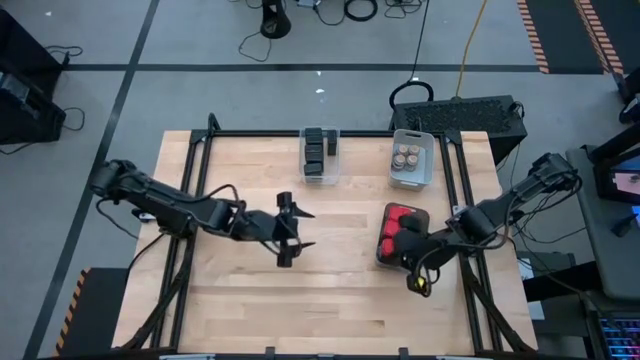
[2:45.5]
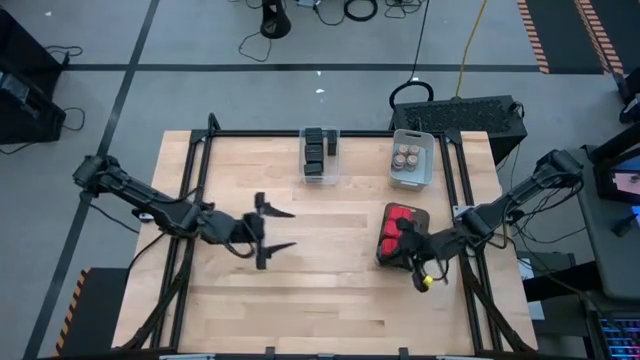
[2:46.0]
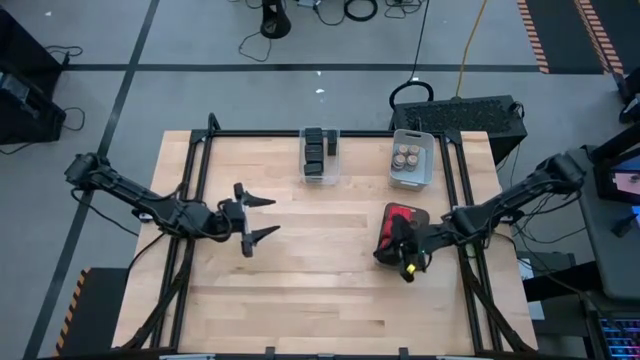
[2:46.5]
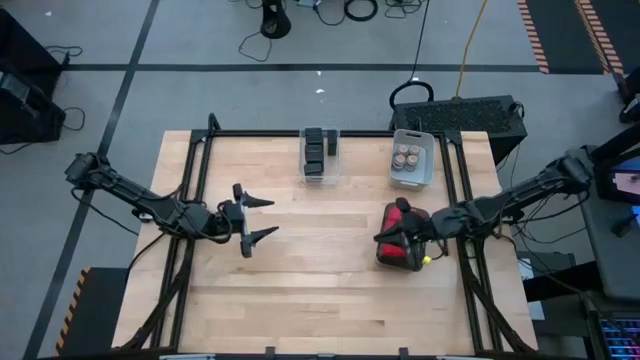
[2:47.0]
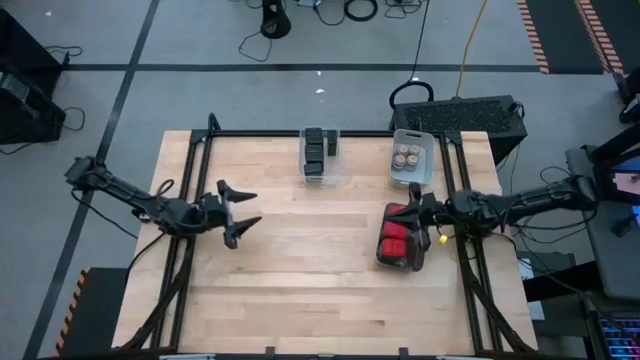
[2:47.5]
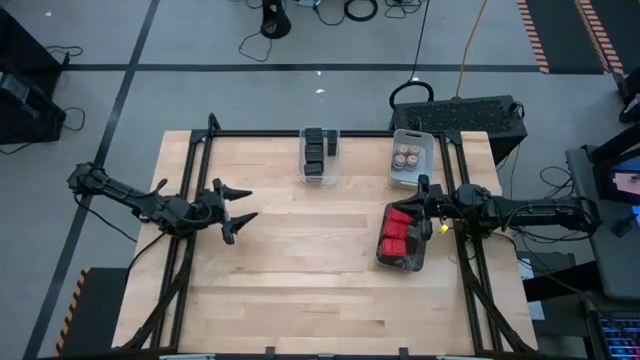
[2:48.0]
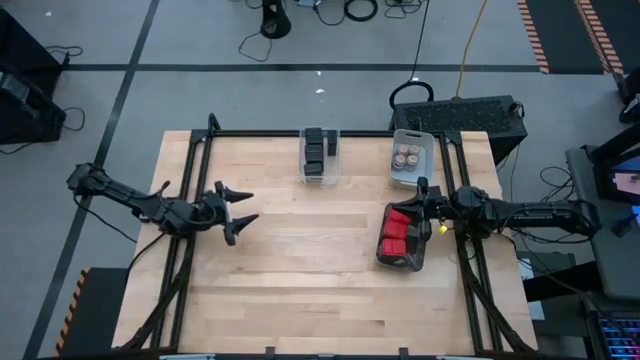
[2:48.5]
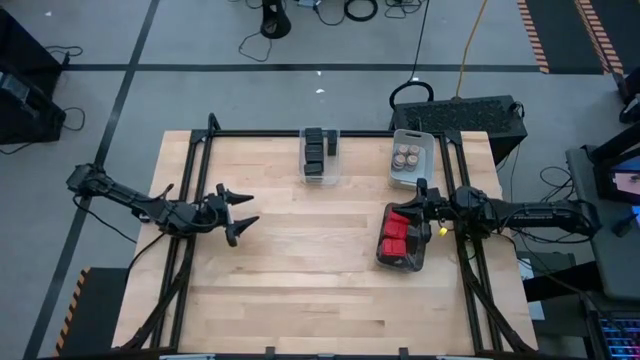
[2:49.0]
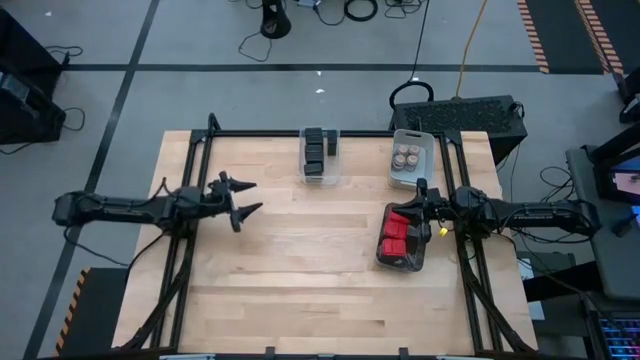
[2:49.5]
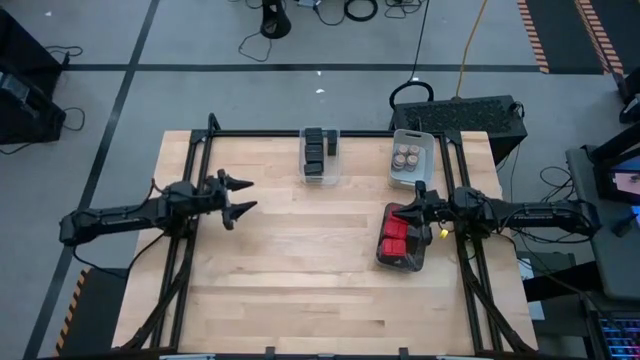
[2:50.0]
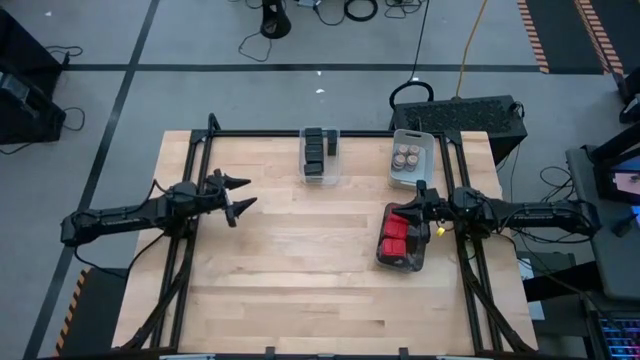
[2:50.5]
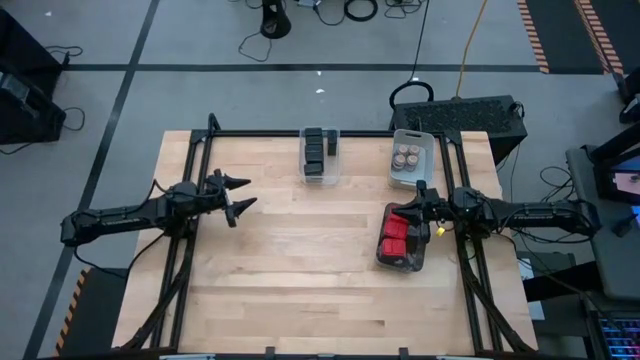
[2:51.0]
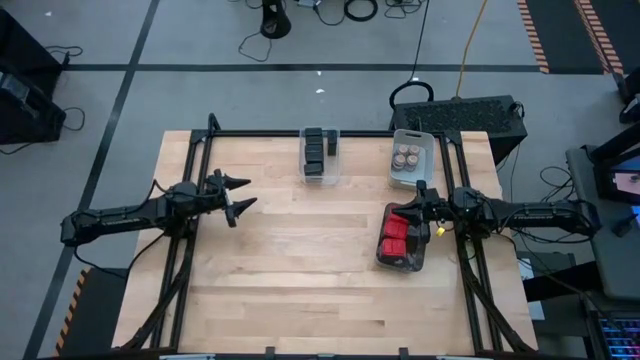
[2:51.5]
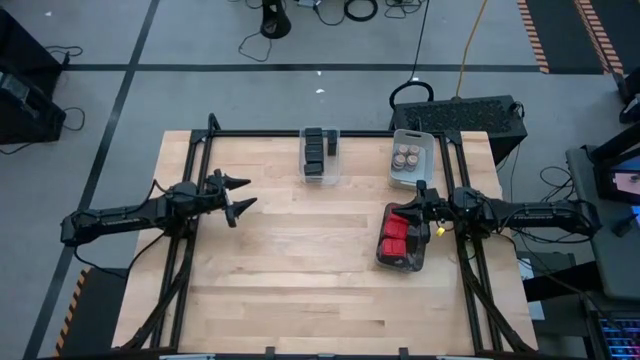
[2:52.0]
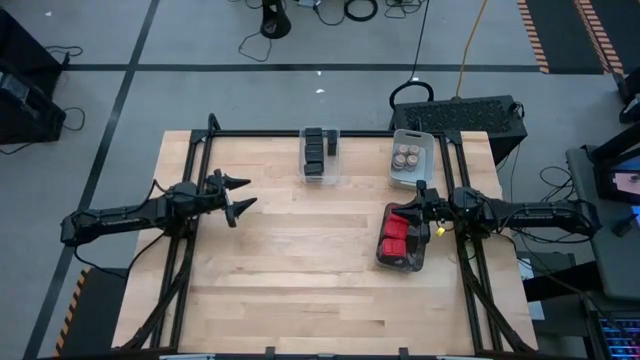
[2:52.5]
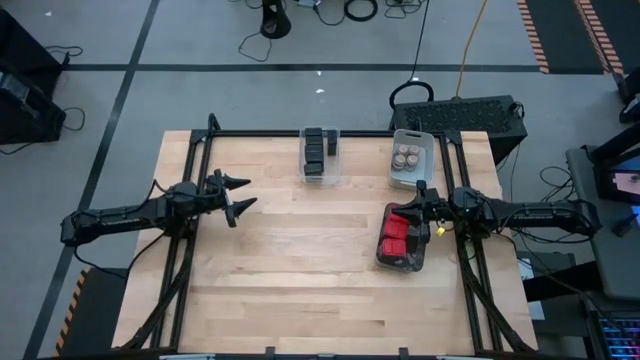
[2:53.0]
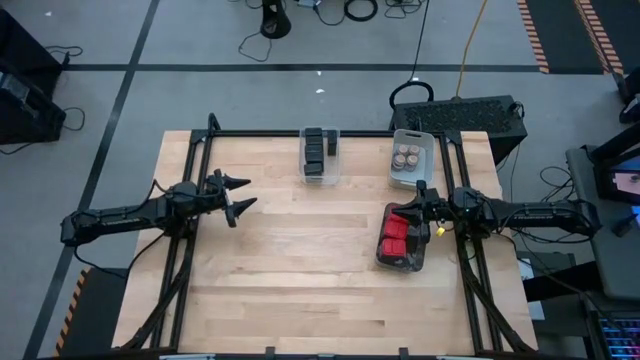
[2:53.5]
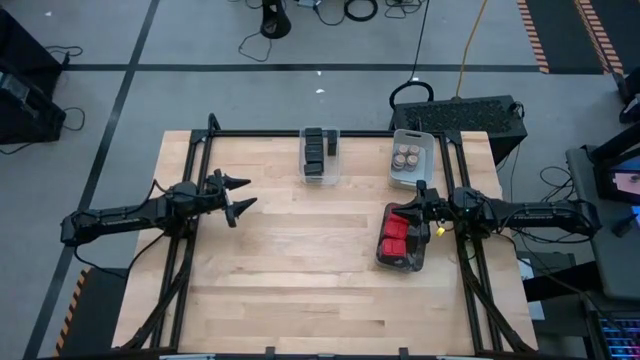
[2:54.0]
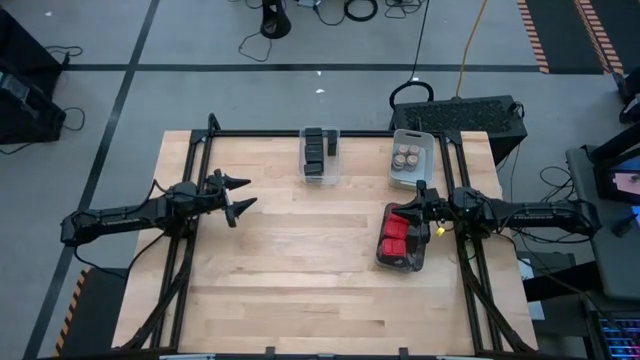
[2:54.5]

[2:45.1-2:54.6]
Task: Sort spices by type
Return to Home Position

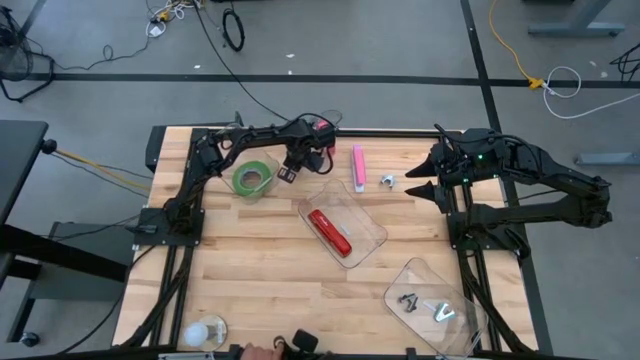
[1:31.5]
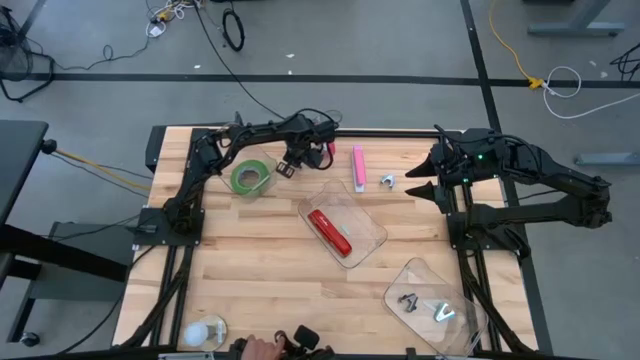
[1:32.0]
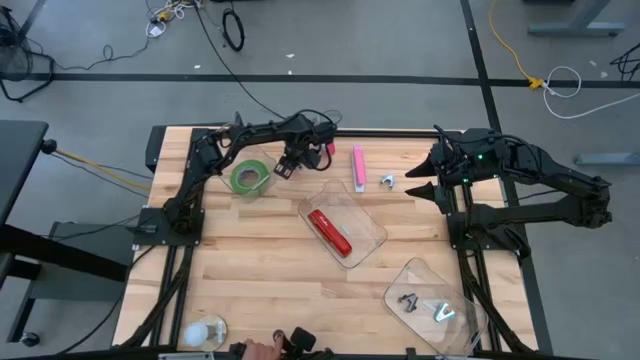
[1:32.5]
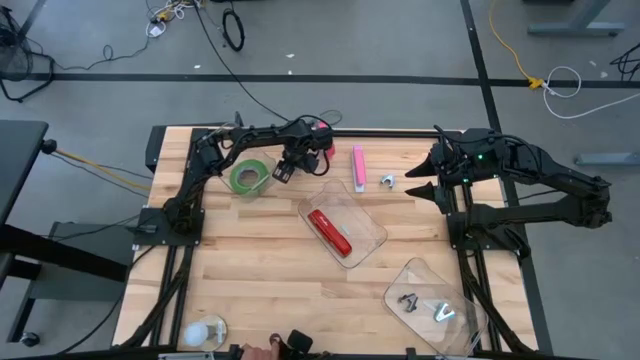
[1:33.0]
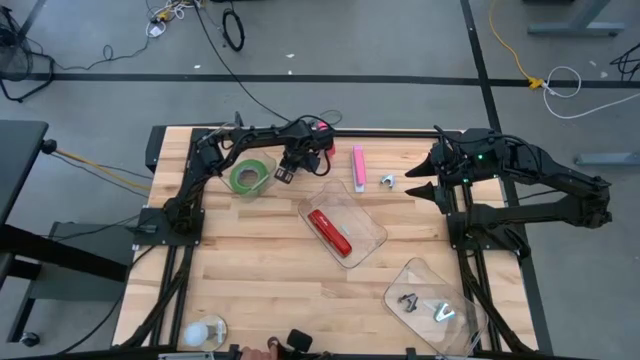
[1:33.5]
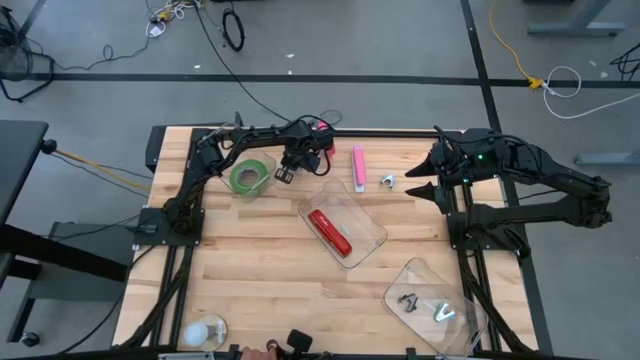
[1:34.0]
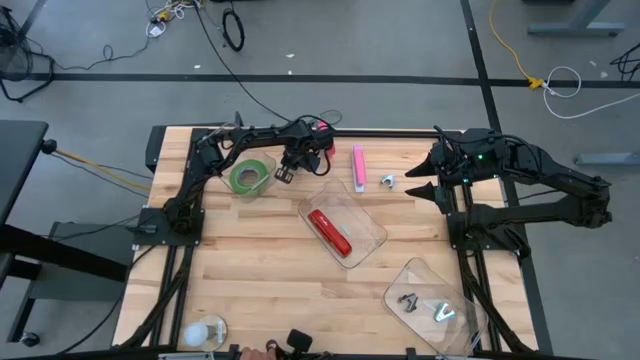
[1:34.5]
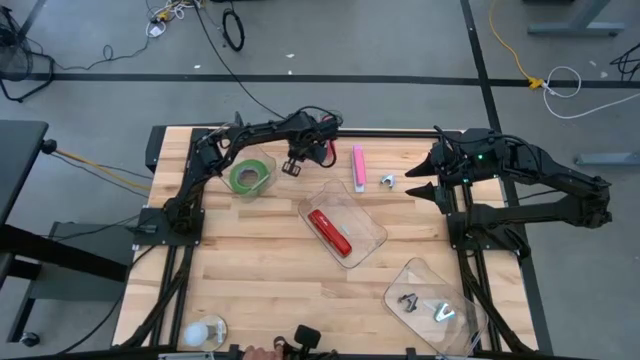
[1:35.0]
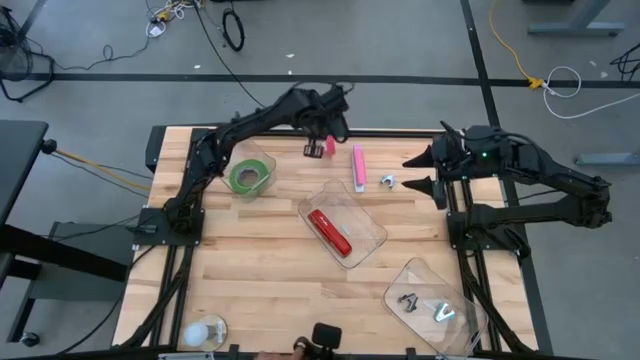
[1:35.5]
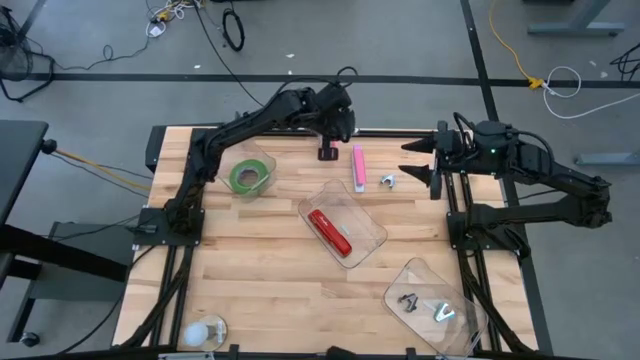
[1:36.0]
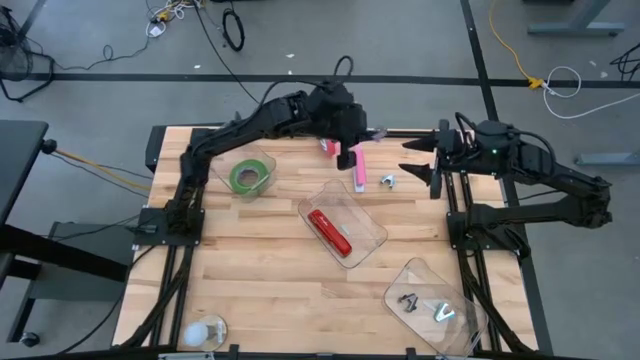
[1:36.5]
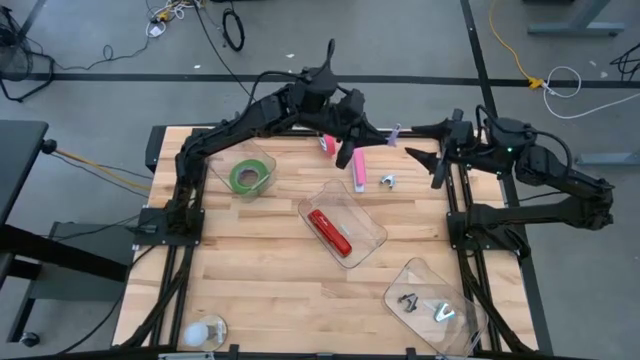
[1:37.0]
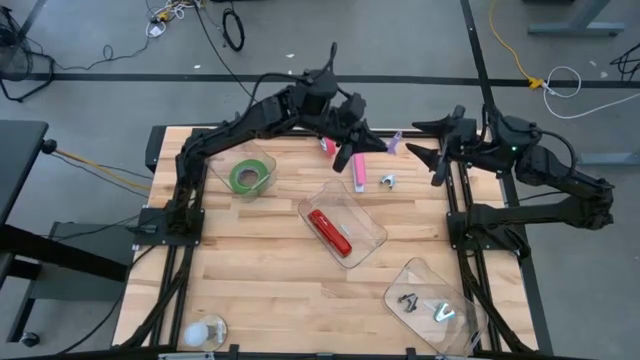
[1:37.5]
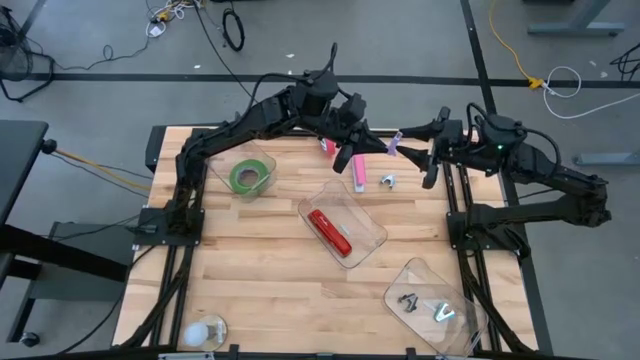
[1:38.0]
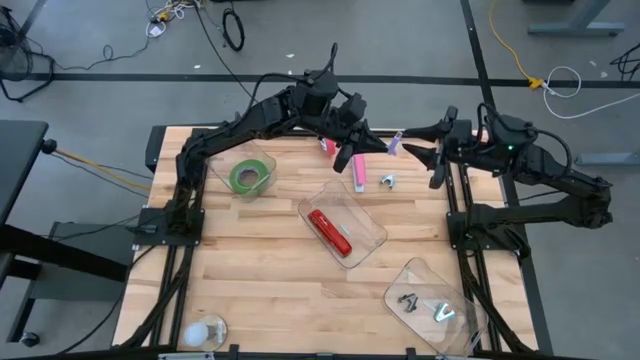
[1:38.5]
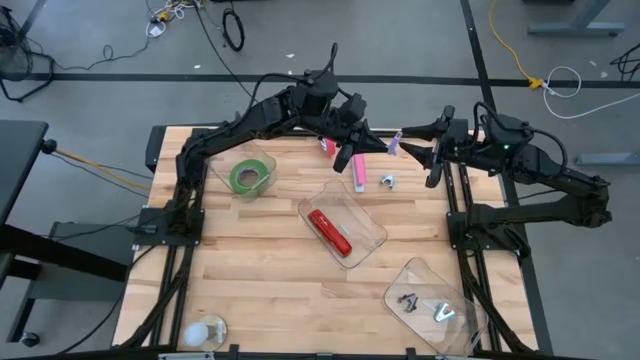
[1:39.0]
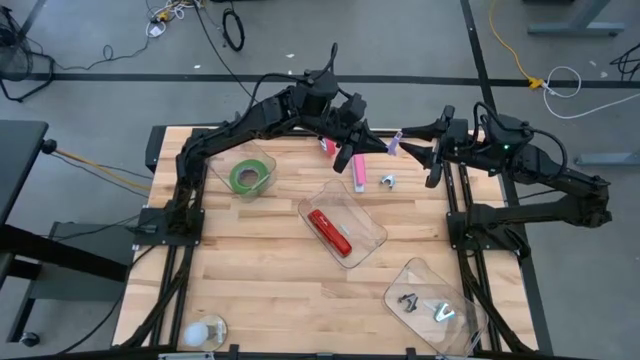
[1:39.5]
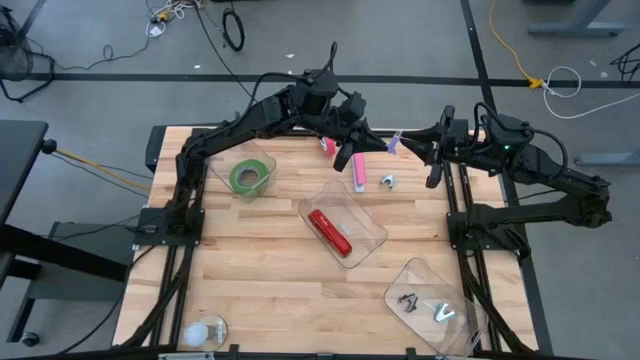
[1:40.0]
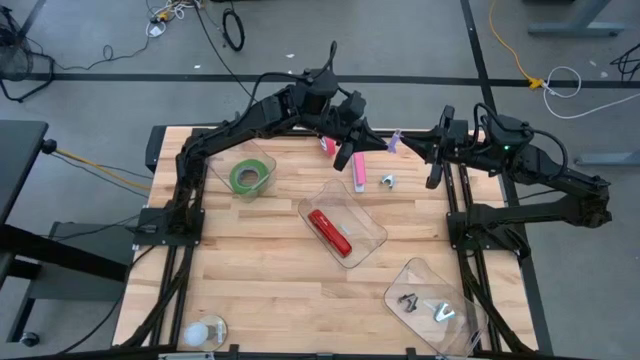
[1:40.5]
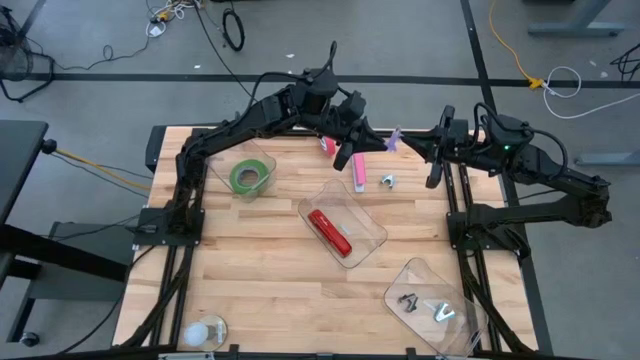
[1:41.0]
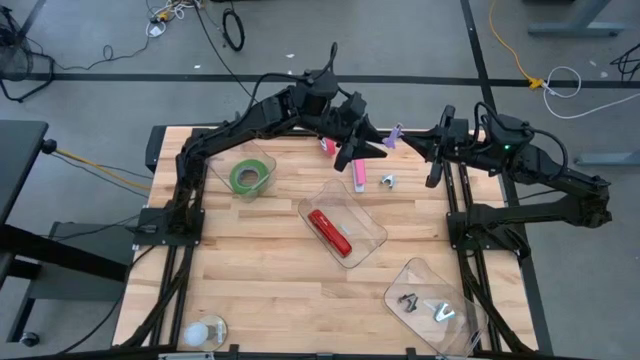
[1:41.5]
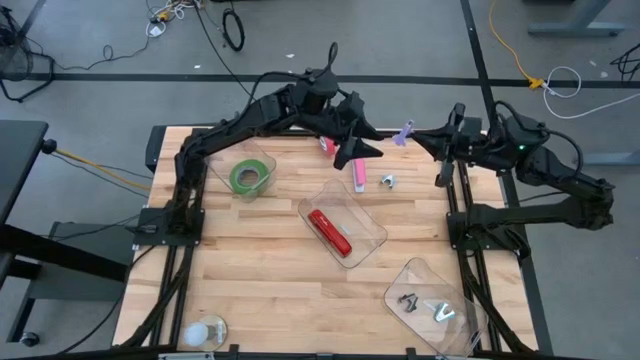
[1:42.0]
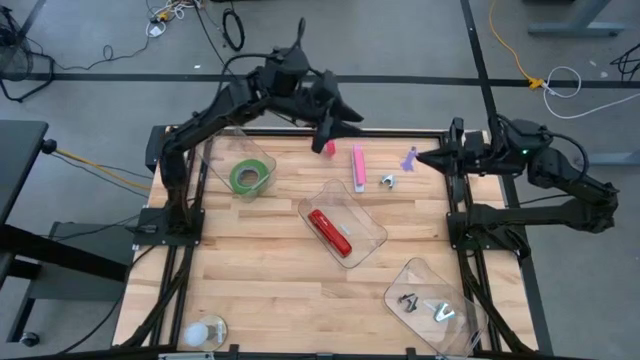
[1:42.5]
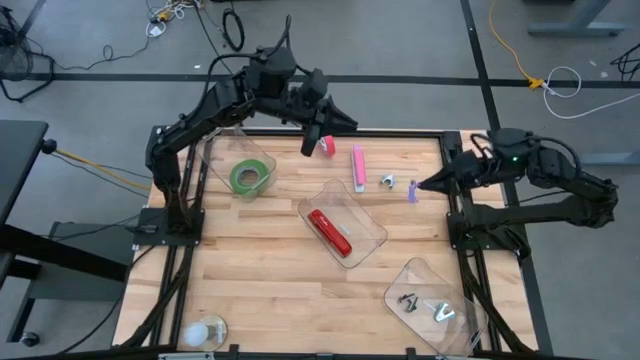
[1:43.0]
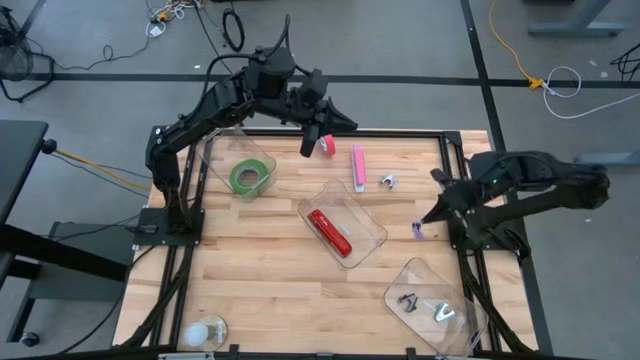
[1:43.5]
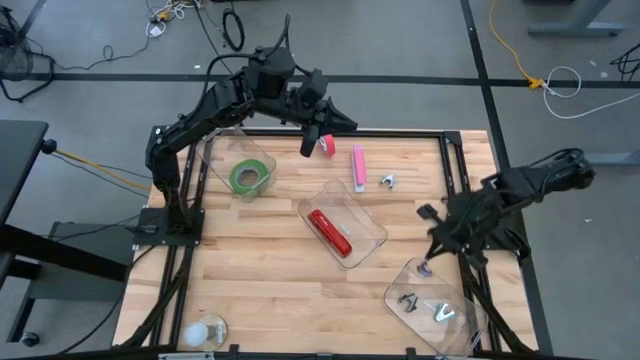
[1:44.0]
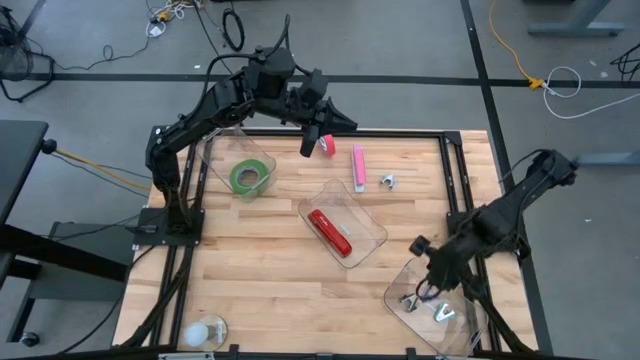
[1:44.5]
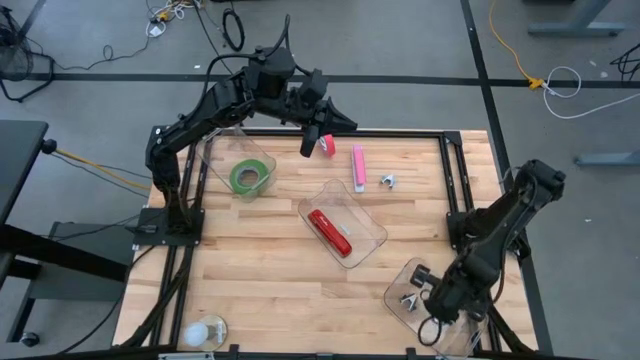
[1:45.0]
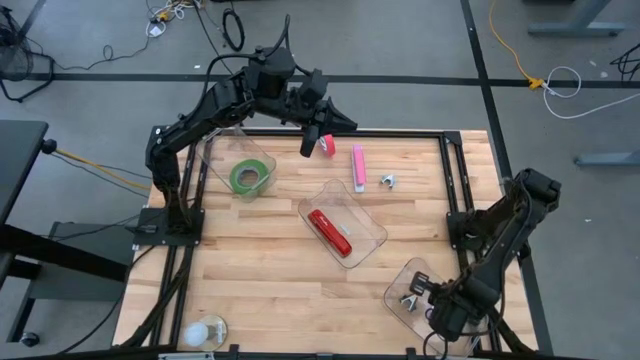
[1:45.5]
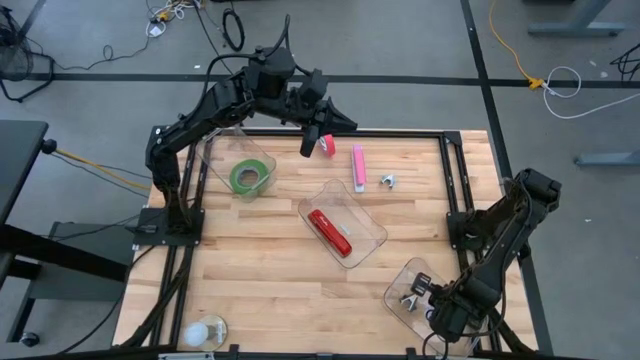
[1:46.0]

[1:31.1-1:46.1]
Task: Pick and place Stapler, Stapler remover, tape
Put the purple staple remover into the bottom transparent bin
